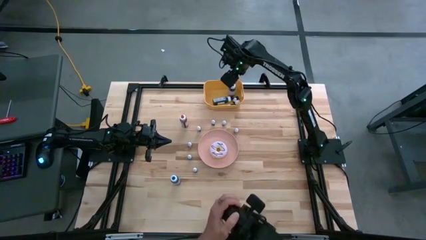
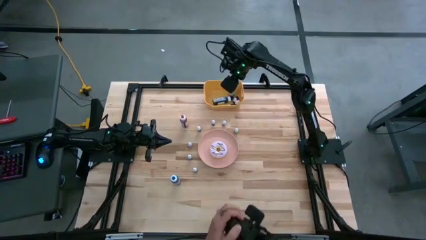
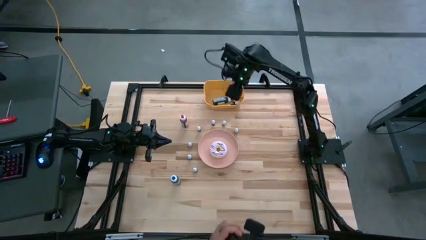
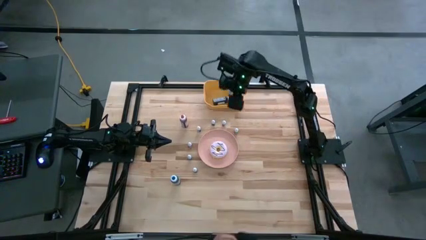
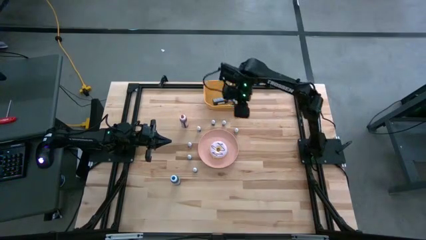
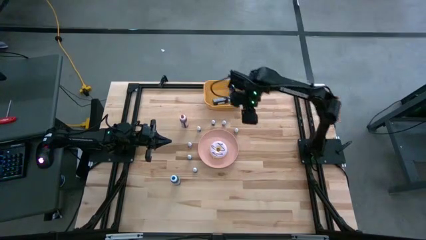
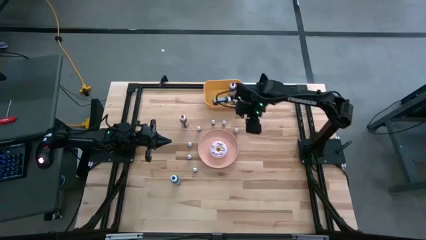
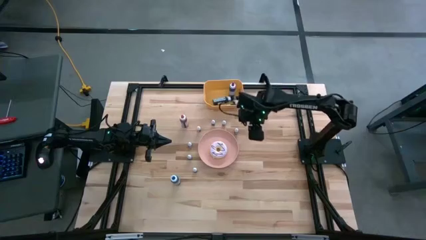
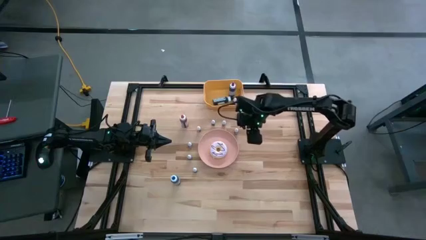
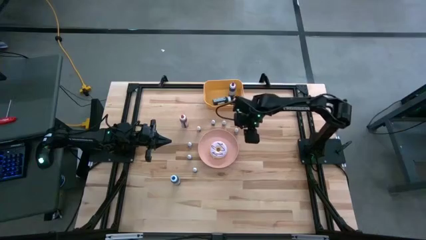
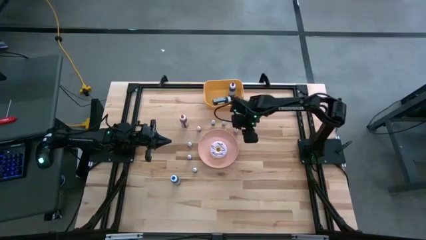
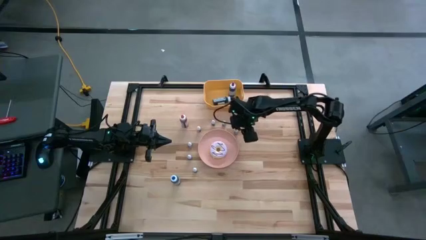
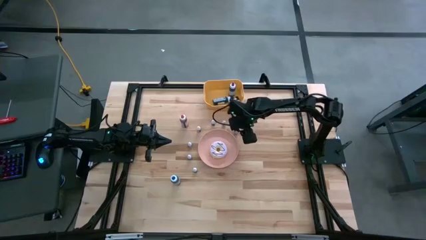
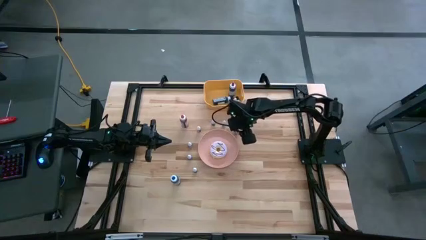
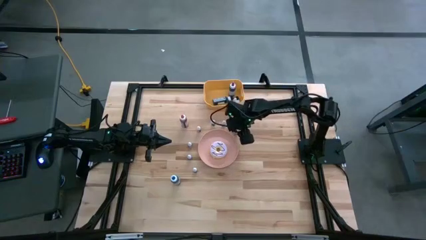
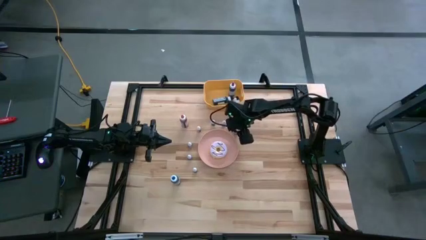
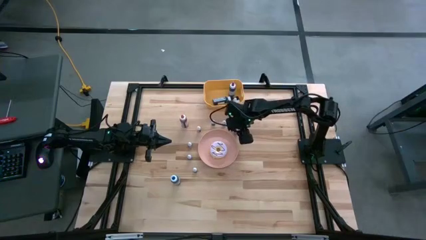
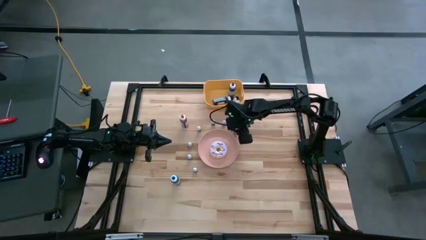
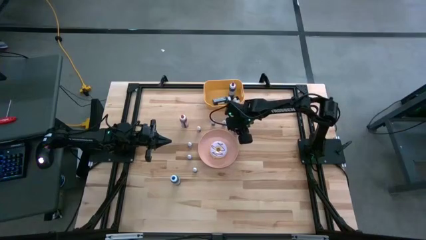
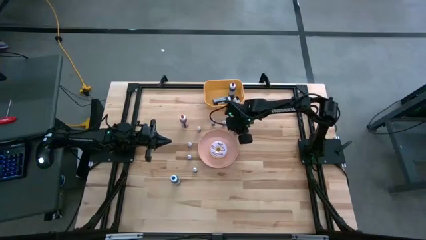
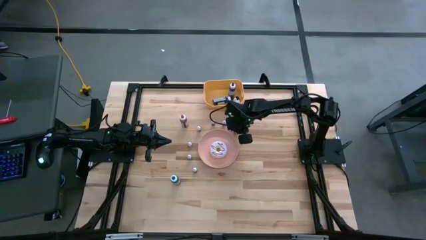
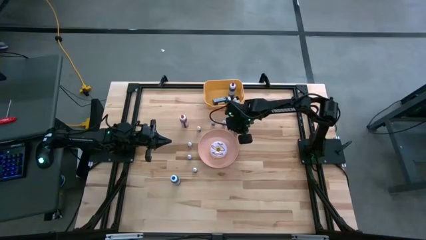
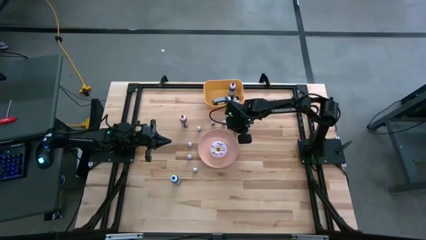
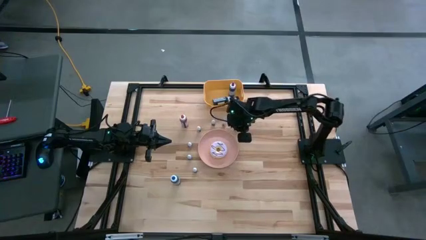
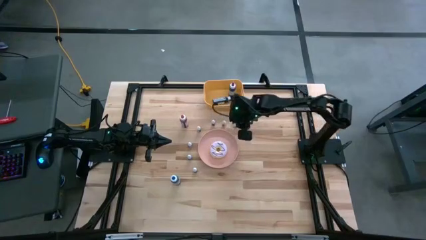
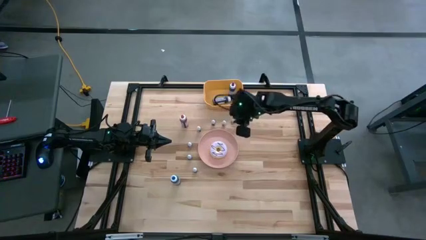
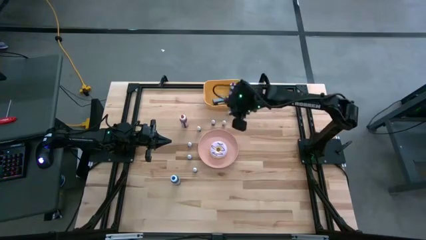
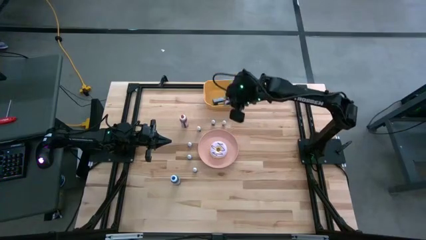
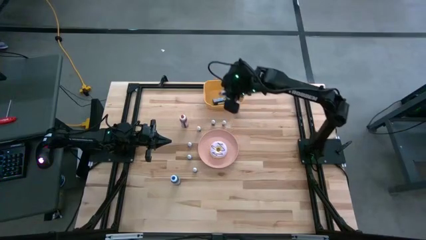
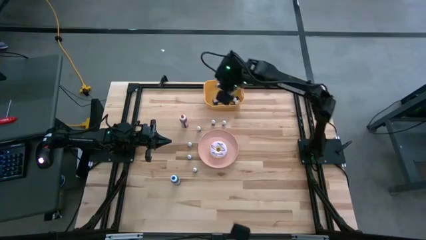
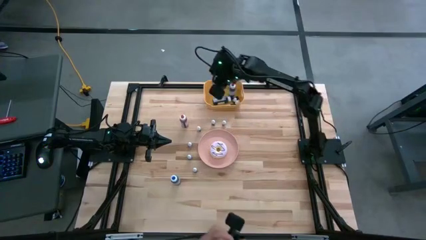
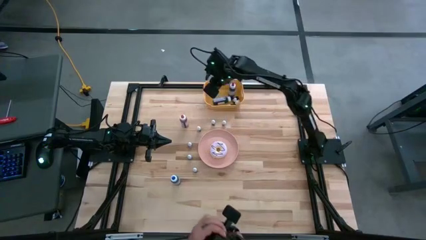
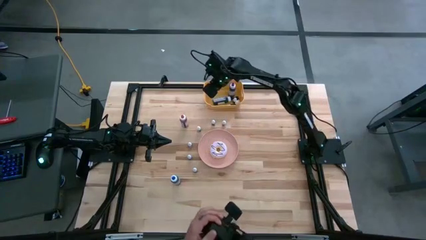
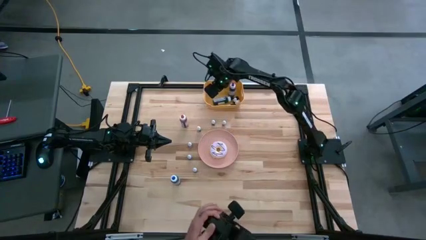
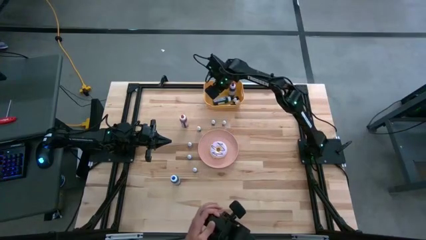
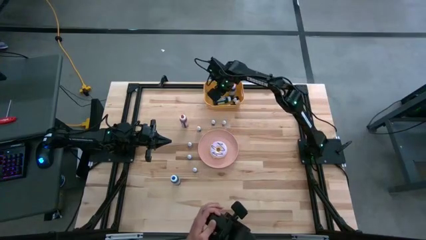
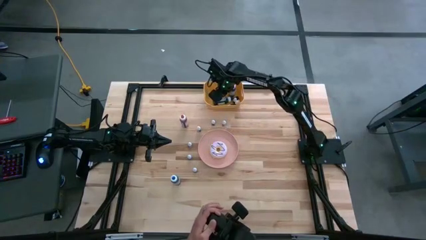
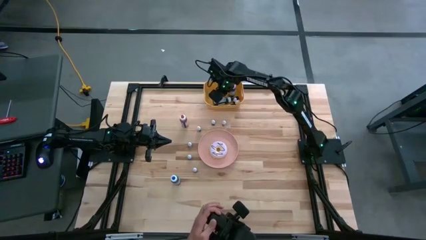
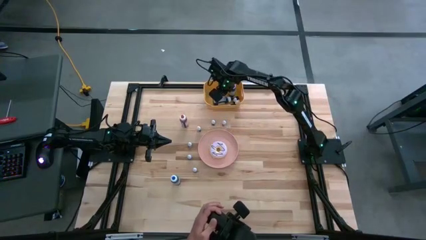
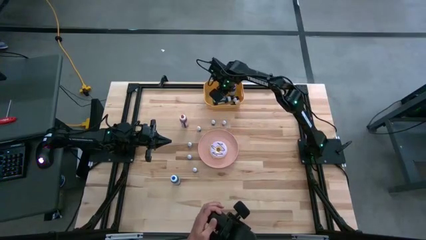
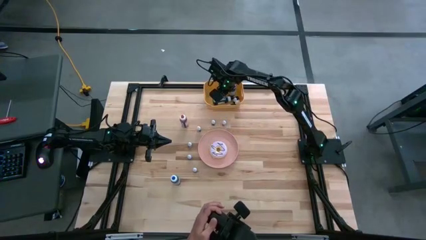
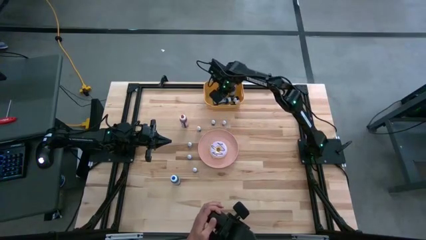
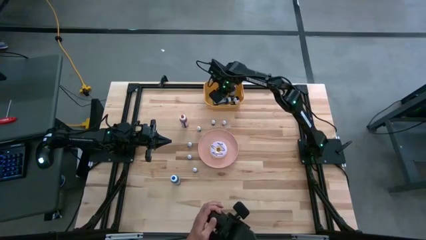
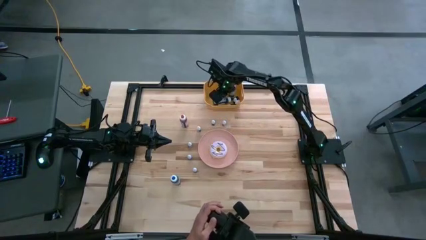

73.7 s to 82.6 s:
Task: Pick & Place food coloring
Put the small red food coloring bottle into the orange bin

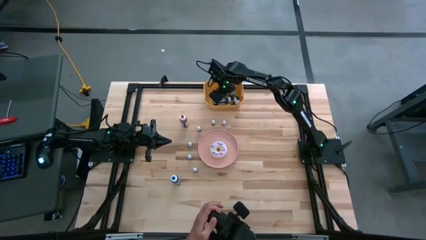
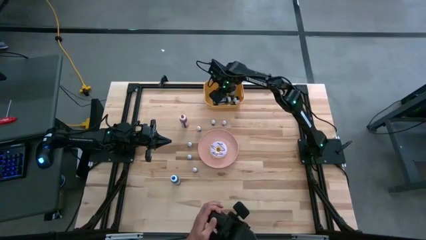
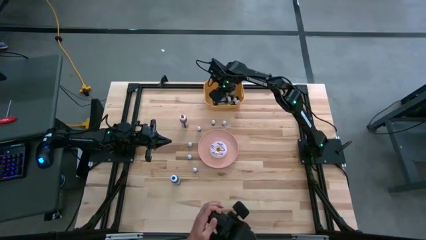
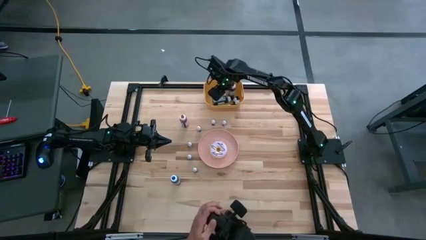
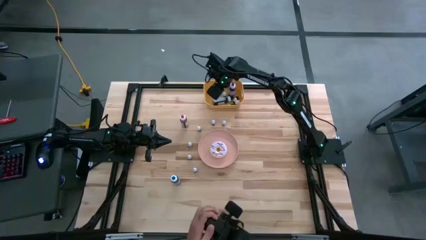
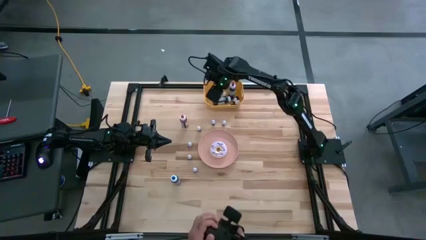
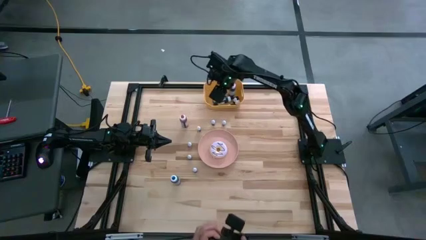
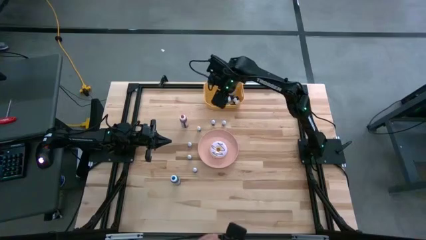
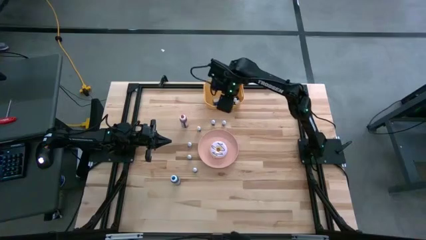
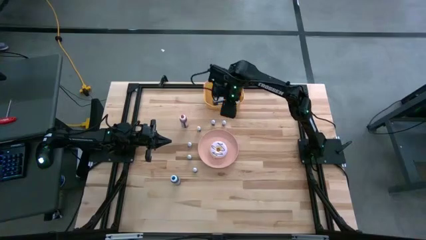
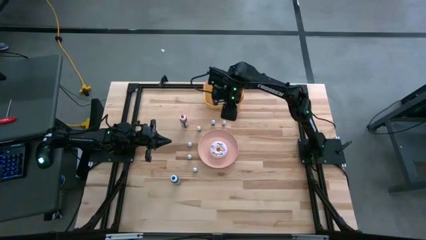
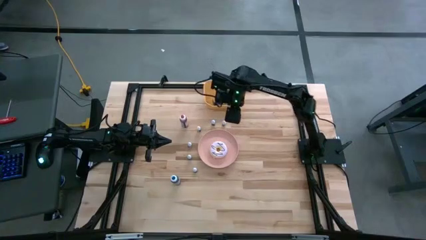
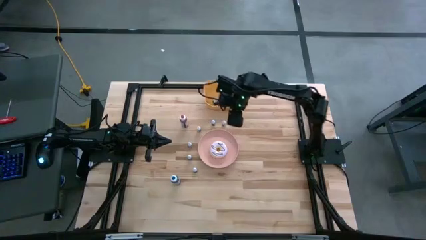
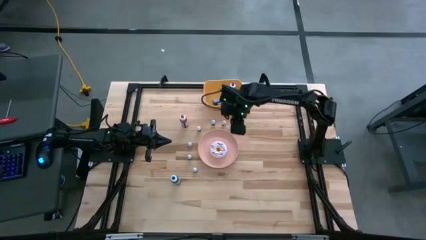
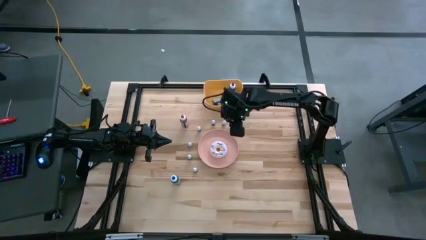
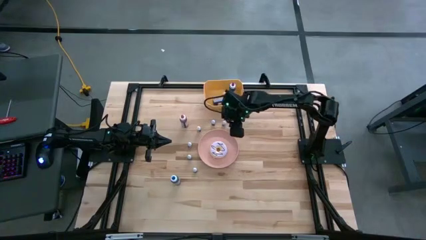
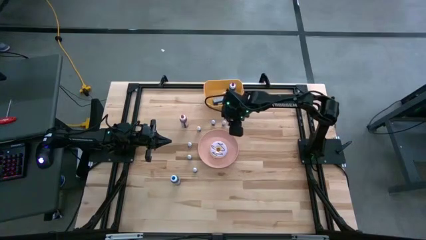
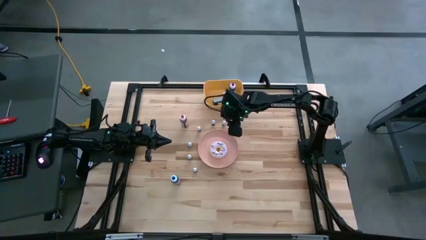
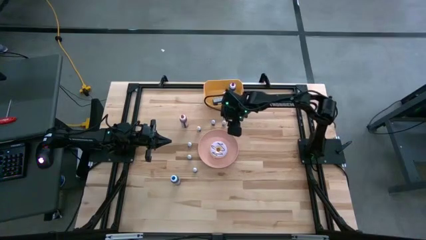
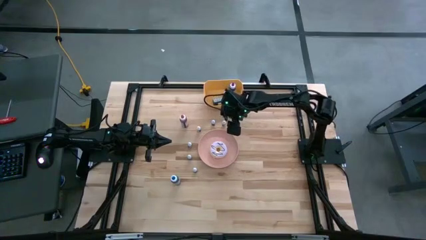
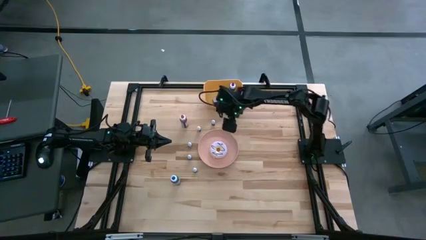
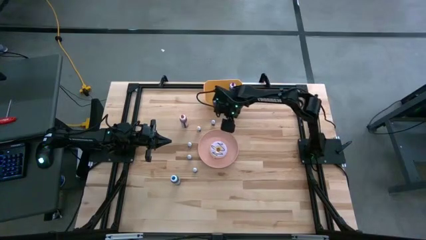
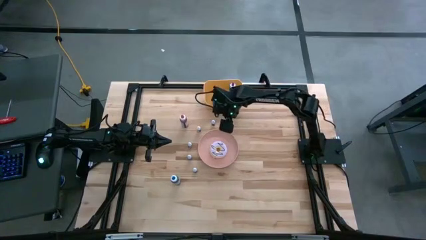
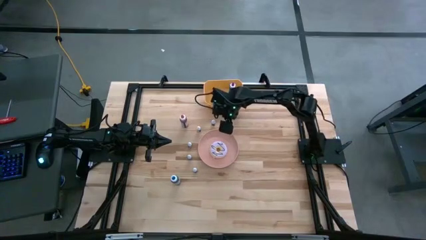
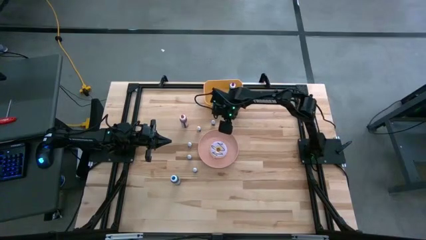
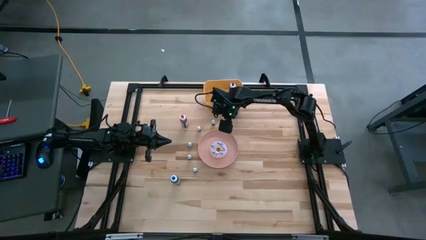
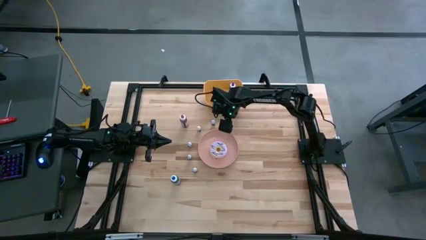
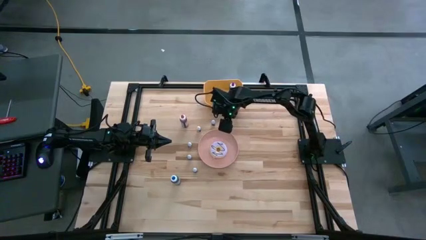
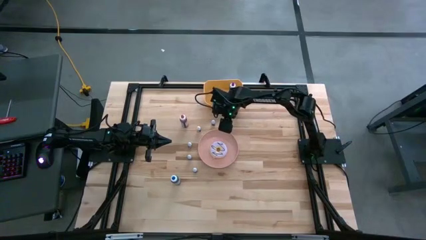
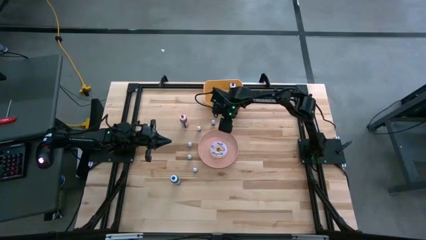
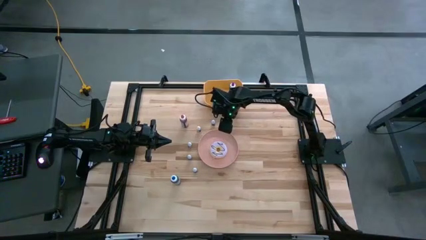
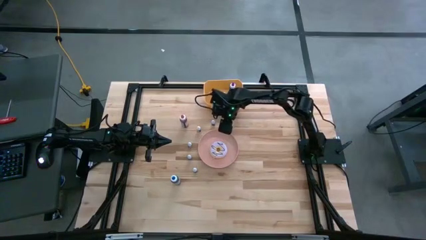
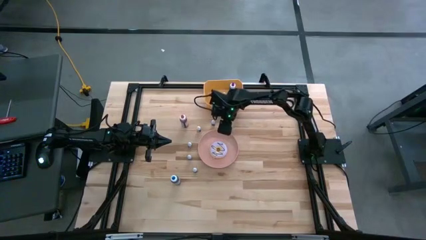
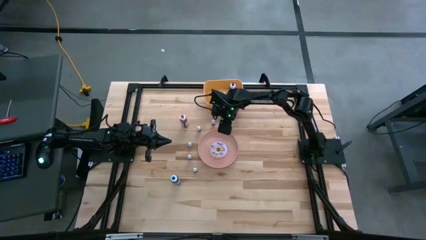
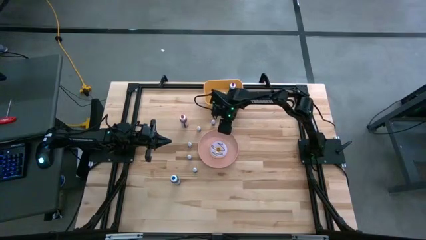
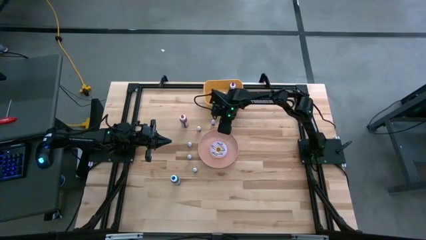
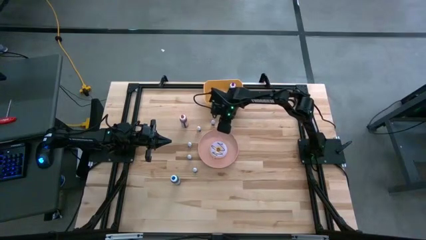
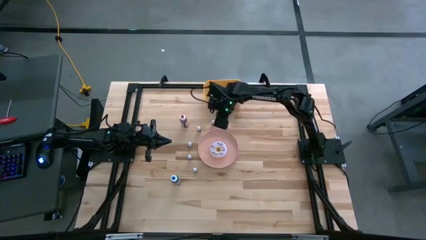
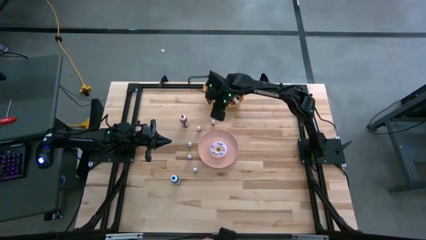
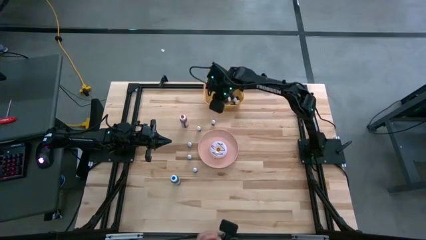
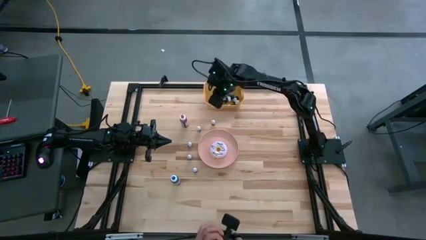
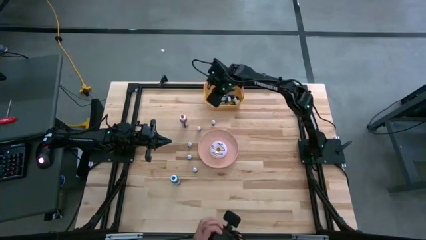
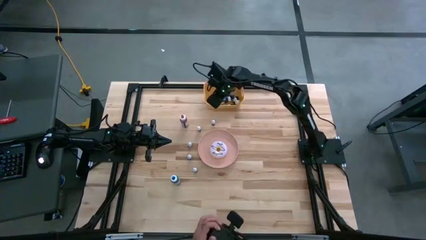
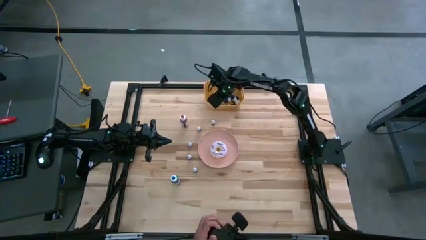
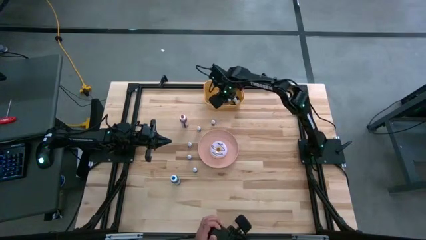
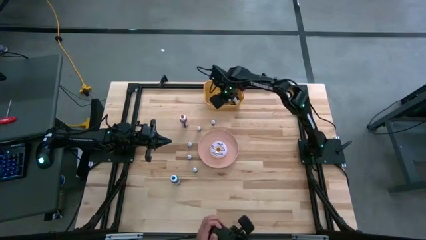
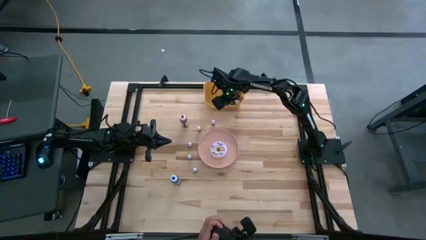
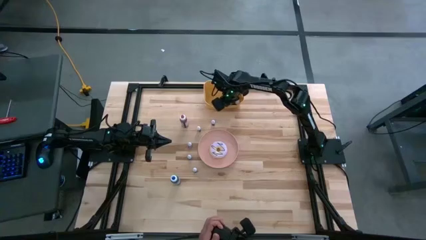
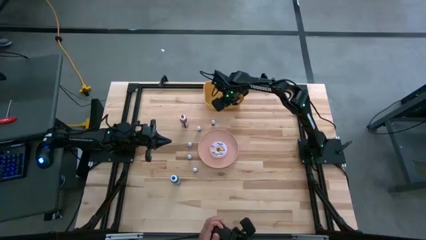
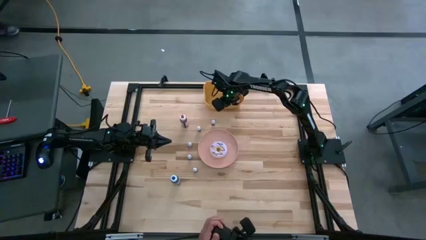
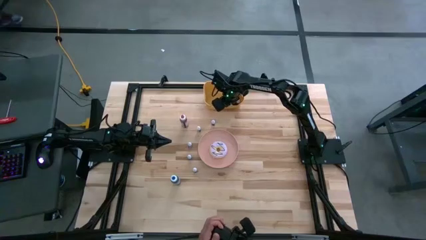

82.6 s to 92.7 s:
Put the small red food coloring bottle into the orange bin
